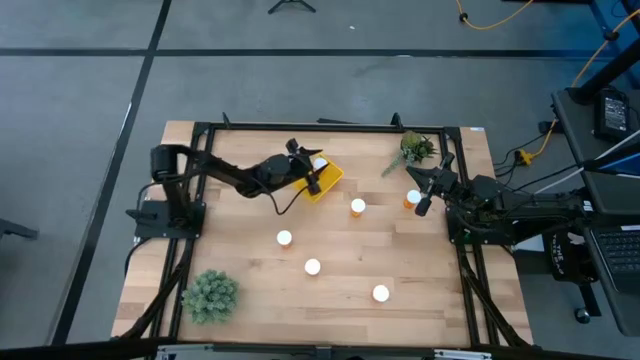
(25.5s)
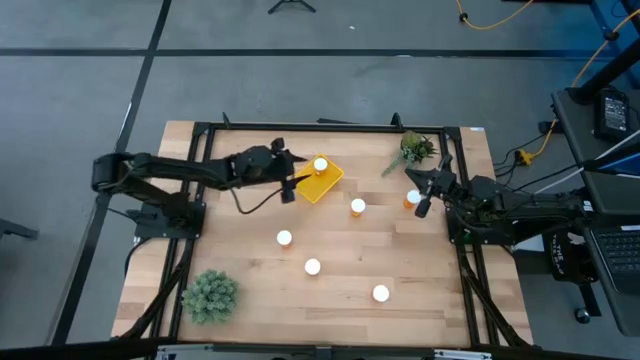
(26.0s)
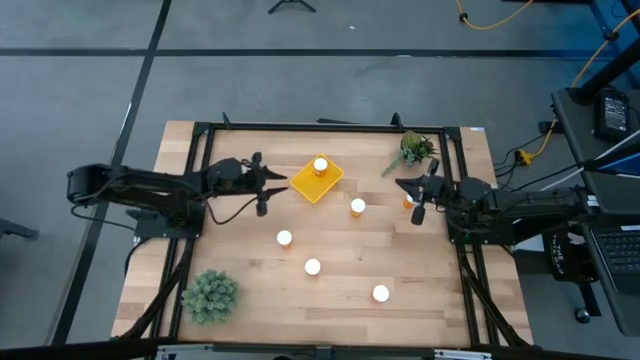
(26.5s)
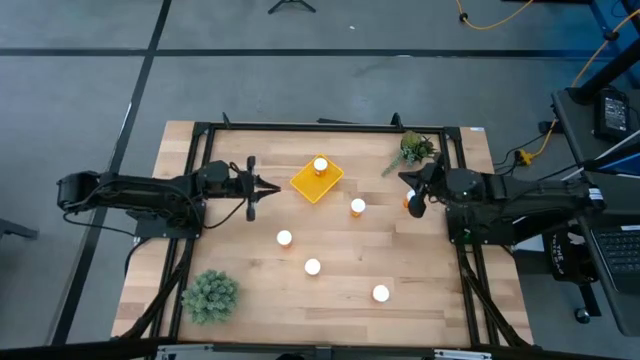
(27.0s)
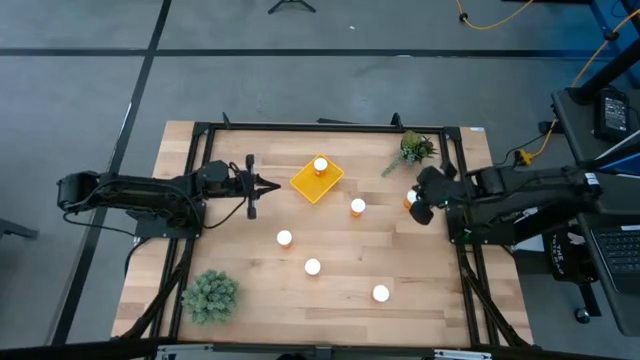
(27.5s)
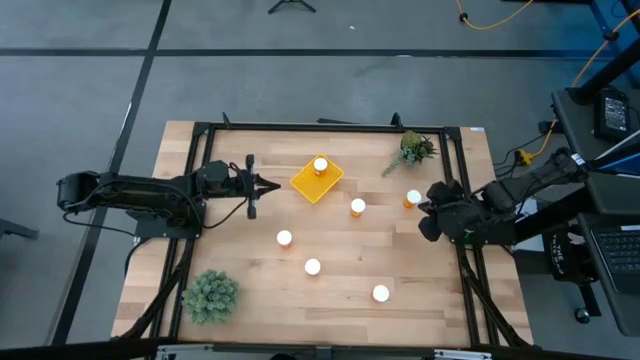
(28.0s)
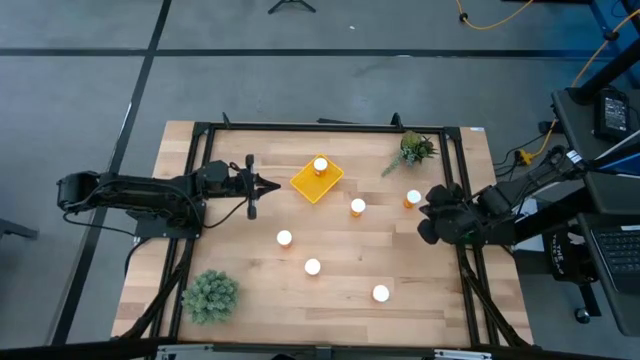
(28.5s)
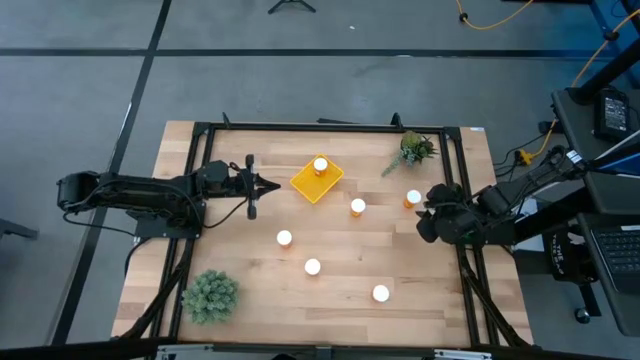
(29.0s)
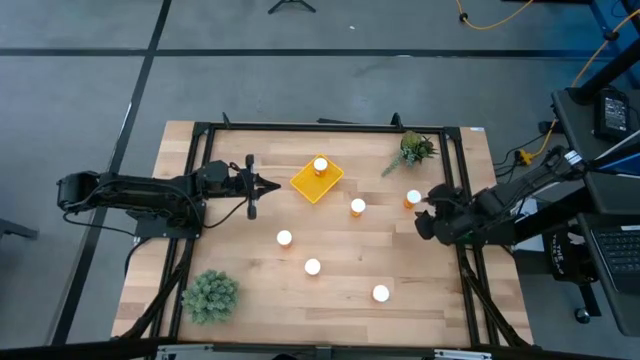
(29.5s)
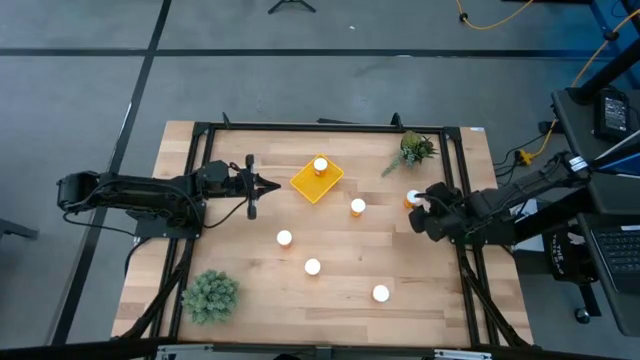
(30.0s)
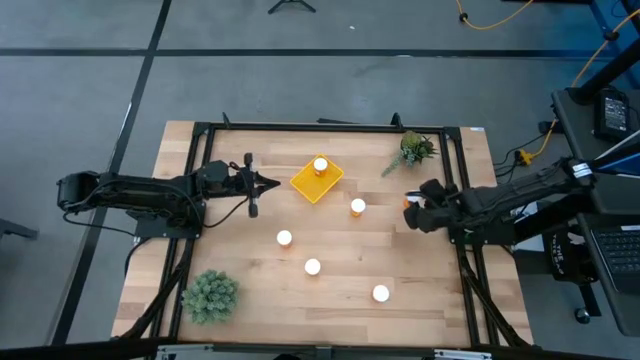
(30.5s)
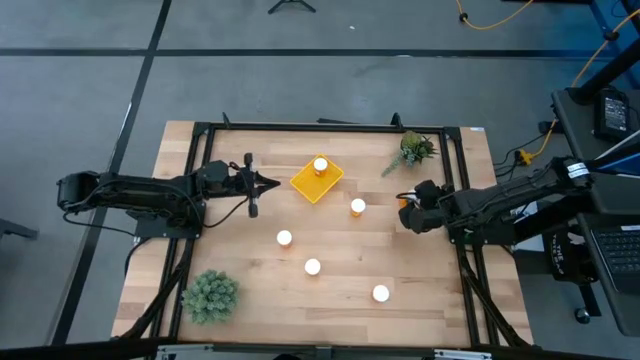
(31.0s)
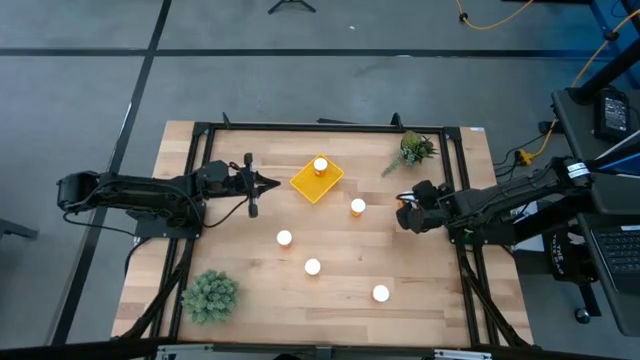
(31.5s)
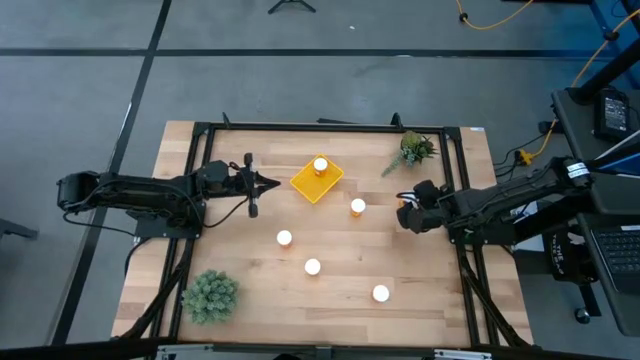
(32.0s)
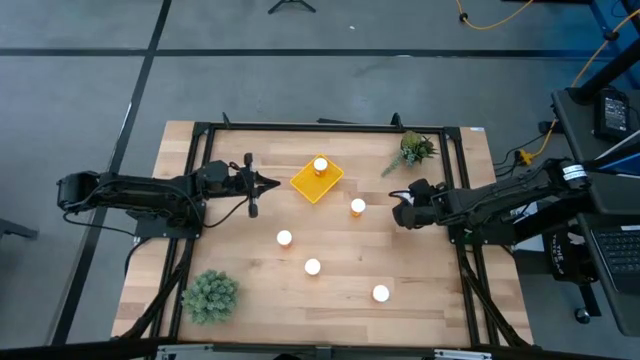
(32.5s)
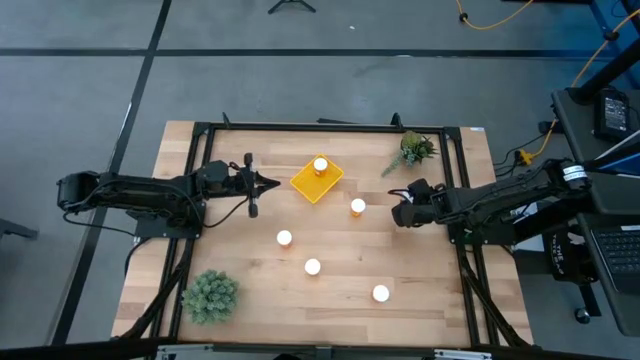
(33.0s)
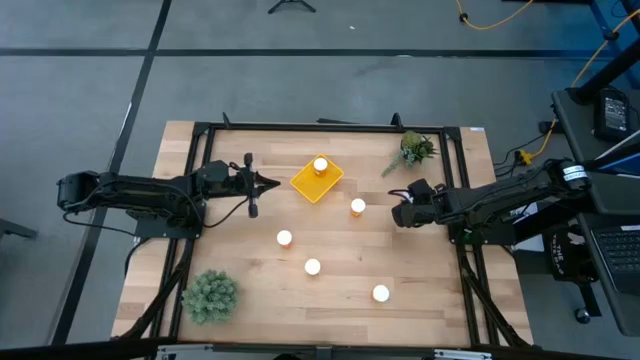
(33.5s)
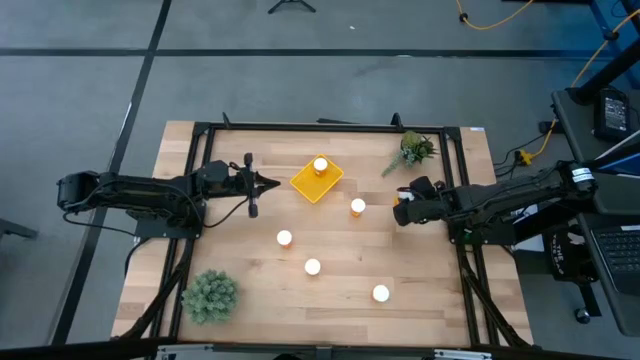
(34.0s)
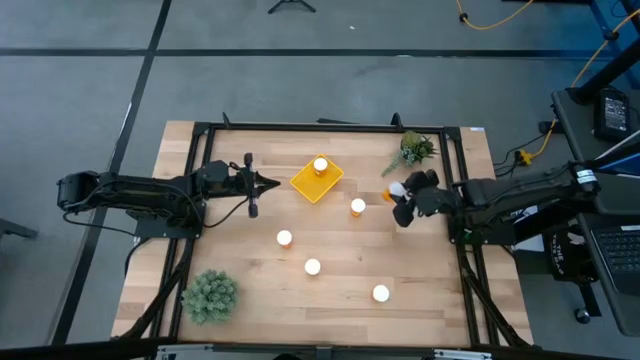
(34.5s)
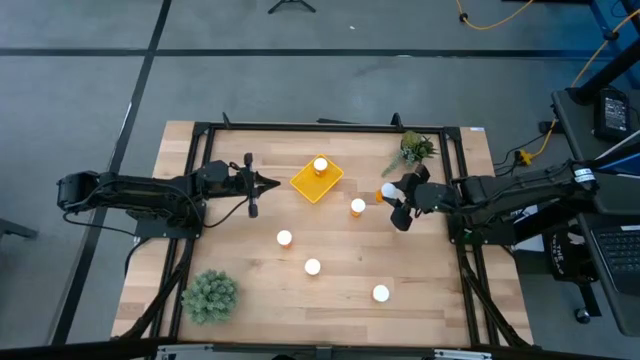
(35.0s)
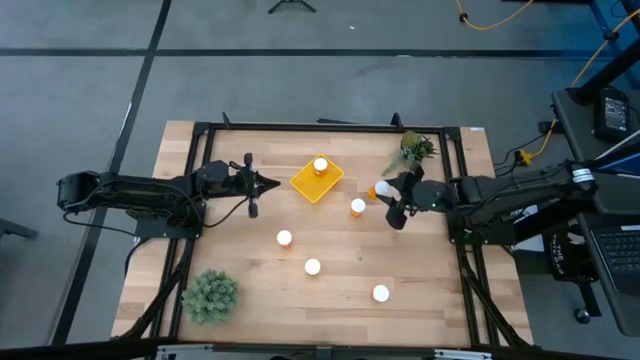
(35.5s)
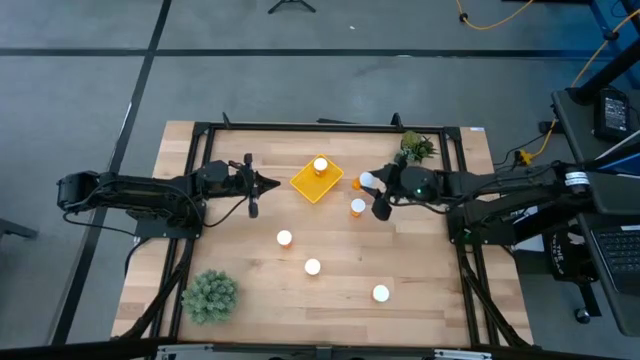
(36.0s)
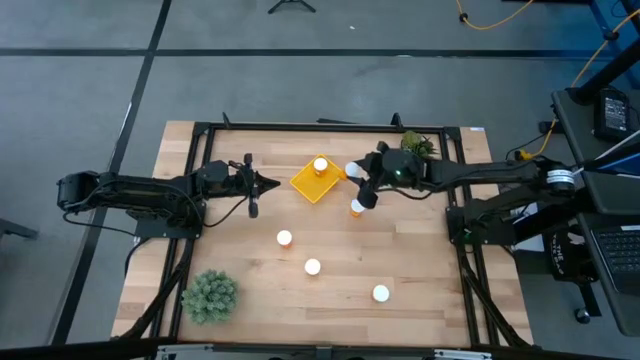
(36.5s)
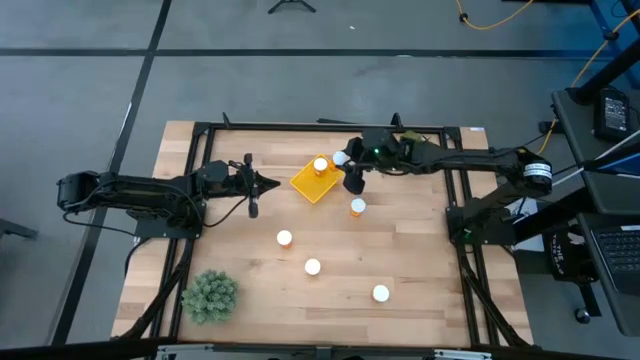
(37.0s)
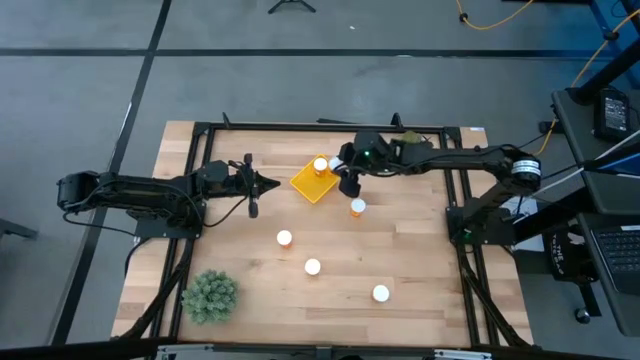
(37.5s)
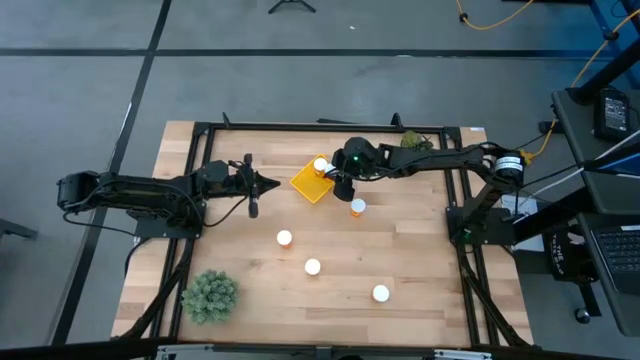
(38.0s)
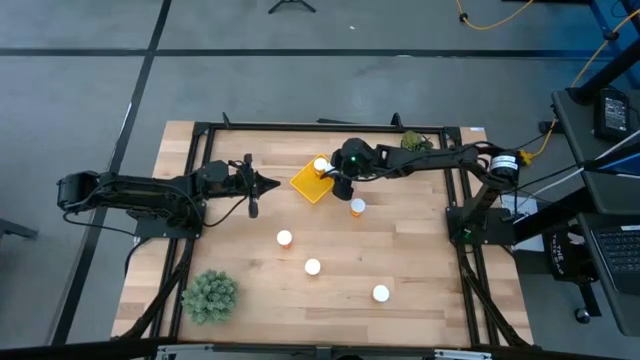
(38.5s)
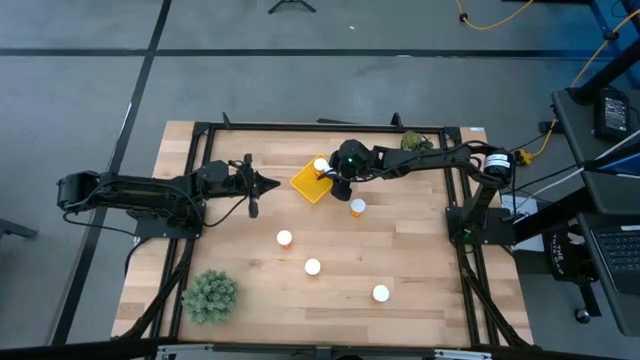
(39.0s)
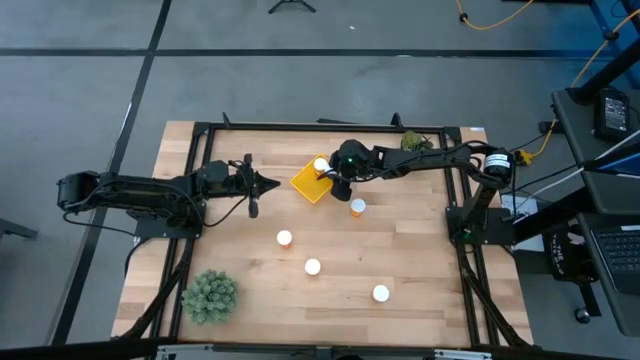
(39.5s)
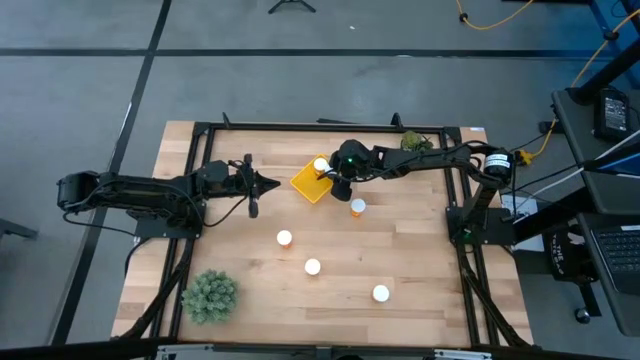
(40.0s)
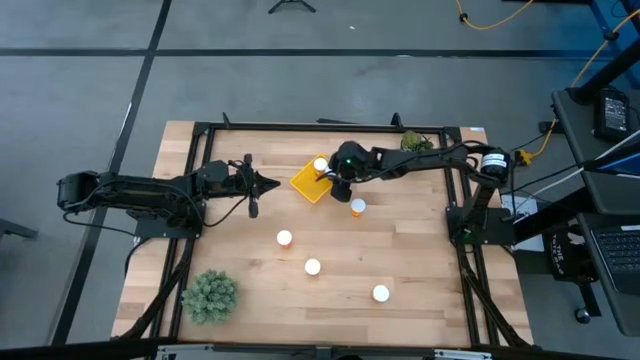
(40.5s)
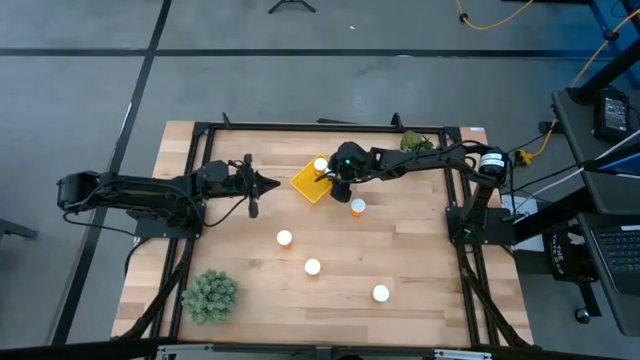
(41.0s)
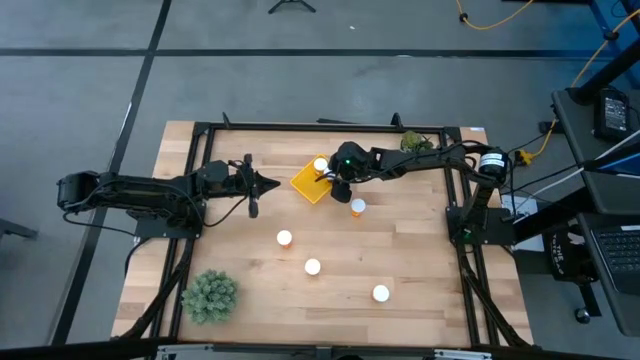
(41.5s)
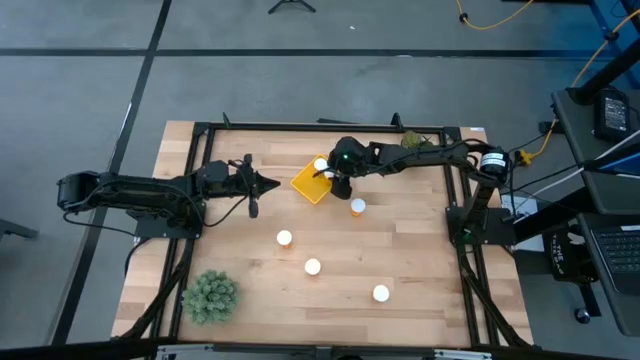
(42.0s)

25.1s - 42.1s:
Task: Pick and place pill bottles into a basket
Put the pill bottle into the bin

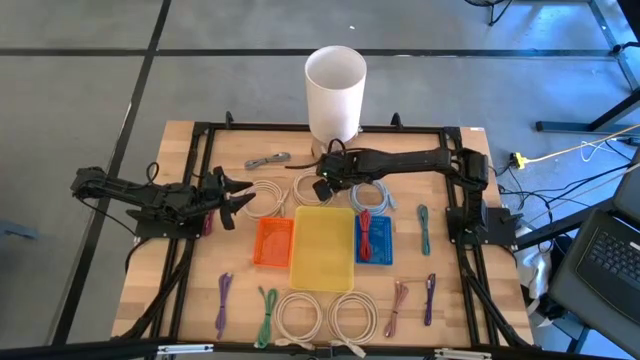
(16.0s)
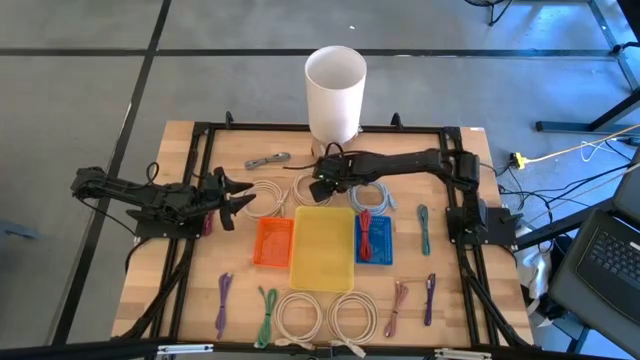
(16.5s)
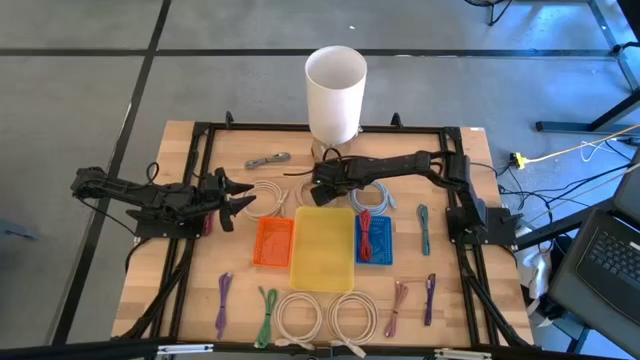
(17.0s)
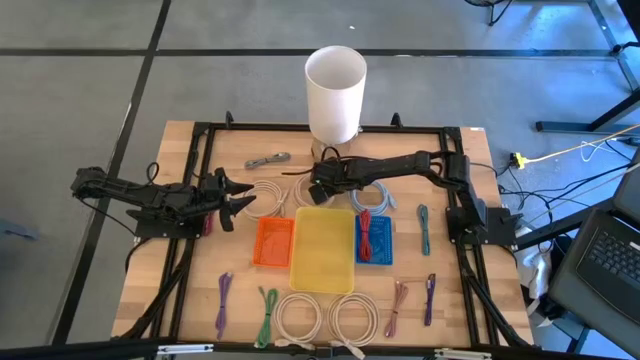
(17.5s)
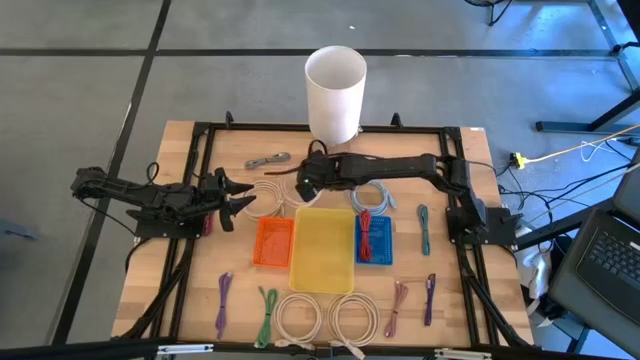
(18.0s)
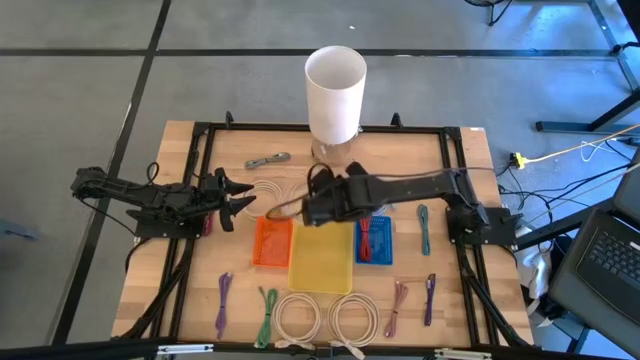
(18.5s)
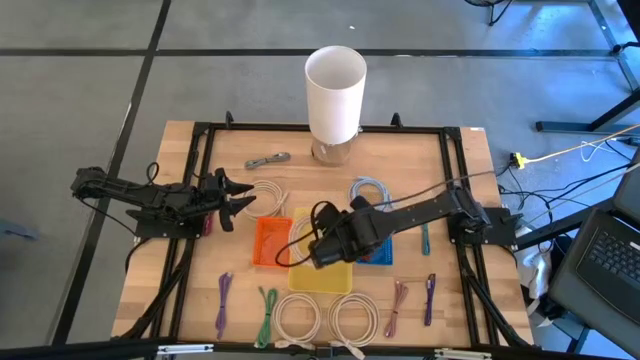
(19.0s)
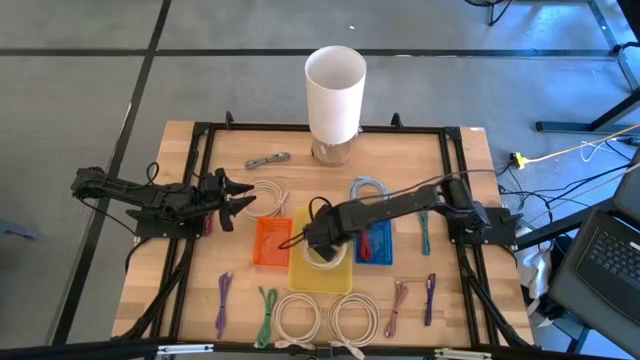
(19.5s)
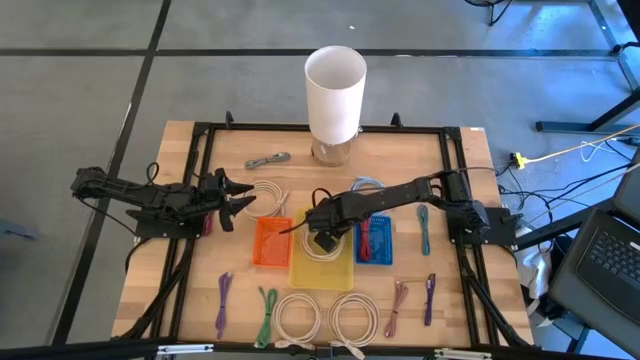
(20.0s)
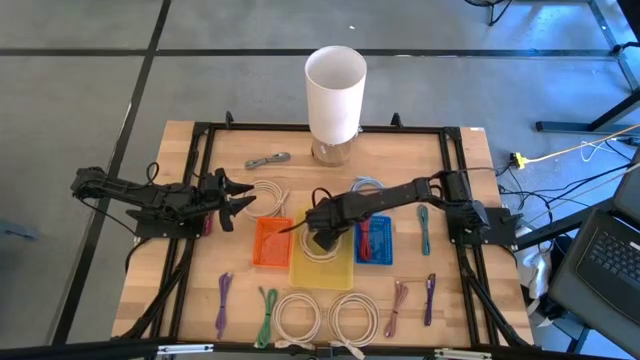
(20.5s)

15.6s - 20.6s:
Task: Pick & Place USB Port
Put the large brown charger cable into the yellow bin
